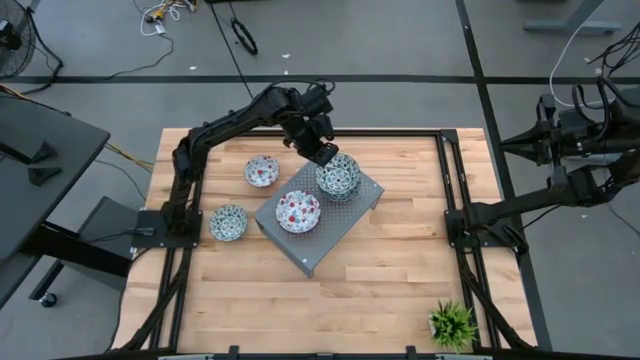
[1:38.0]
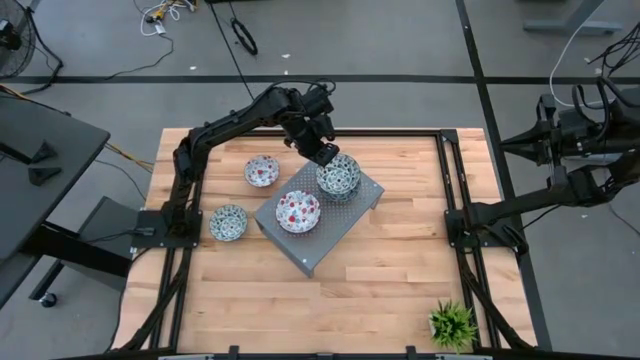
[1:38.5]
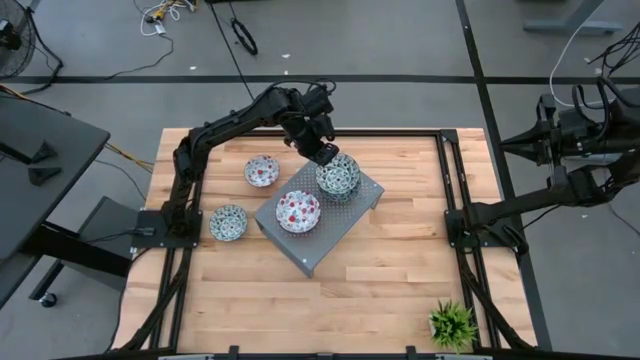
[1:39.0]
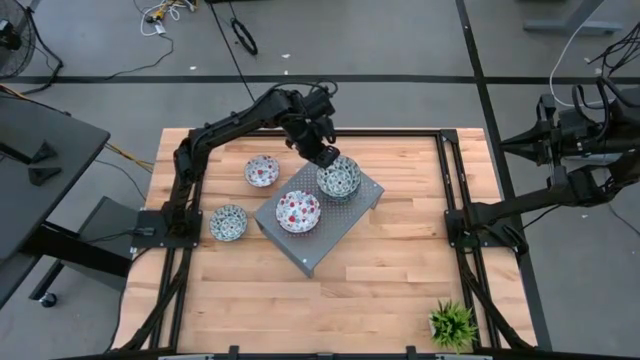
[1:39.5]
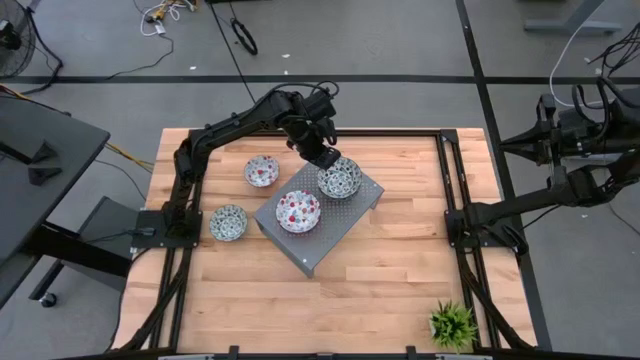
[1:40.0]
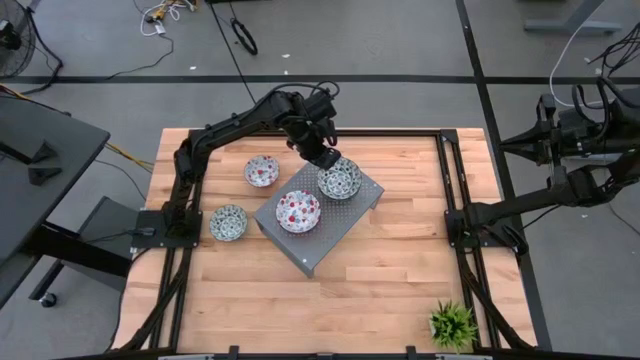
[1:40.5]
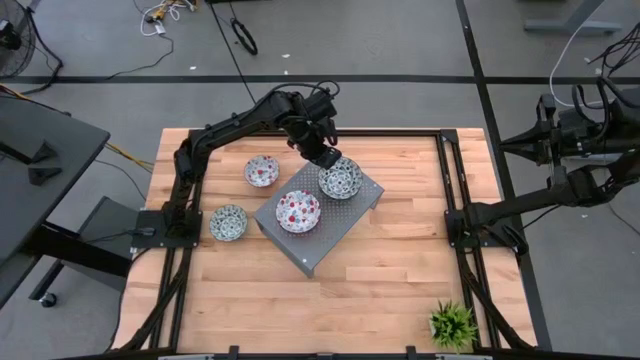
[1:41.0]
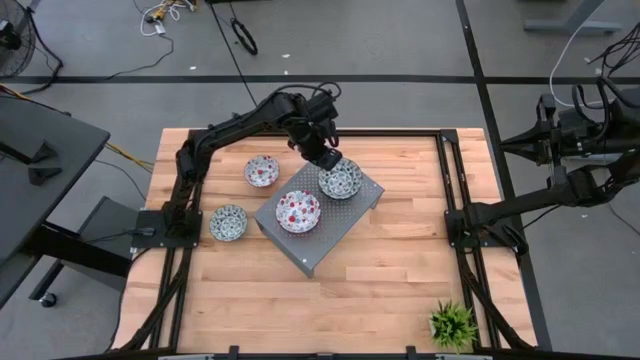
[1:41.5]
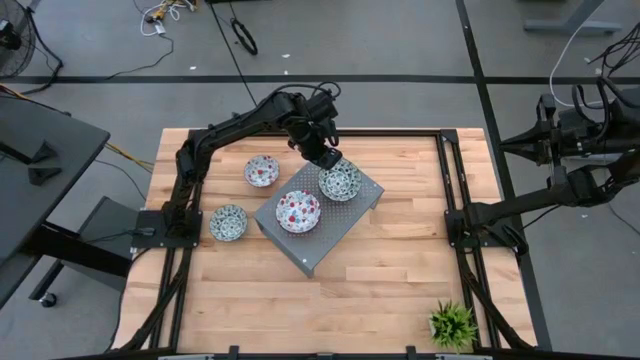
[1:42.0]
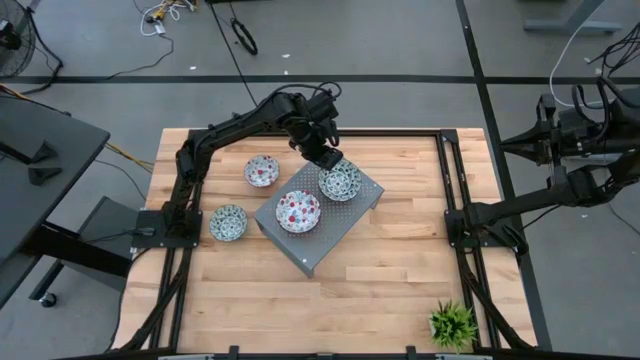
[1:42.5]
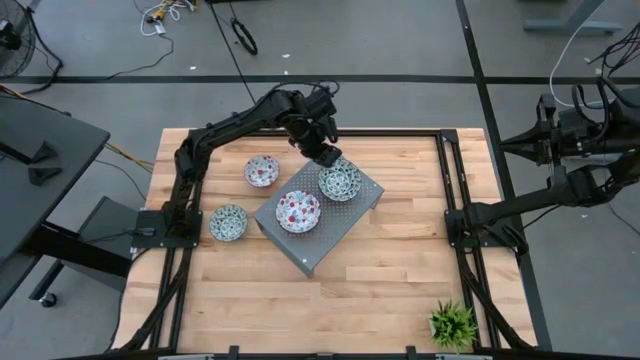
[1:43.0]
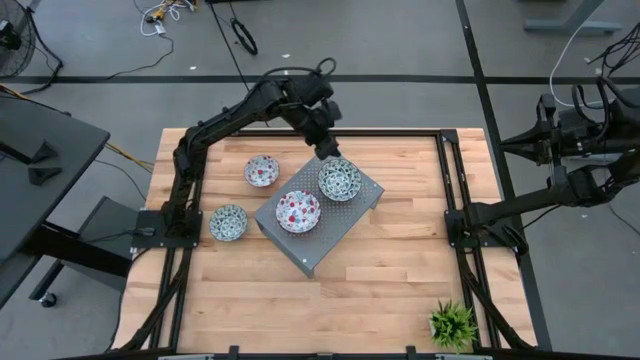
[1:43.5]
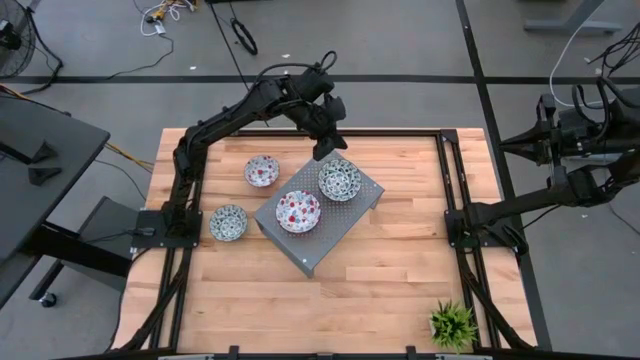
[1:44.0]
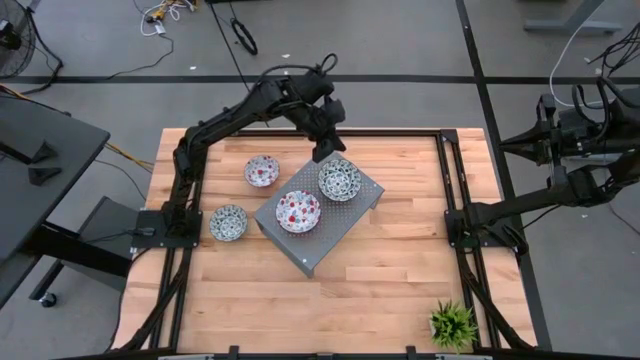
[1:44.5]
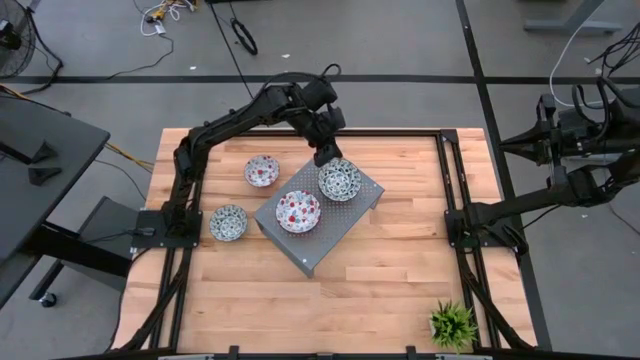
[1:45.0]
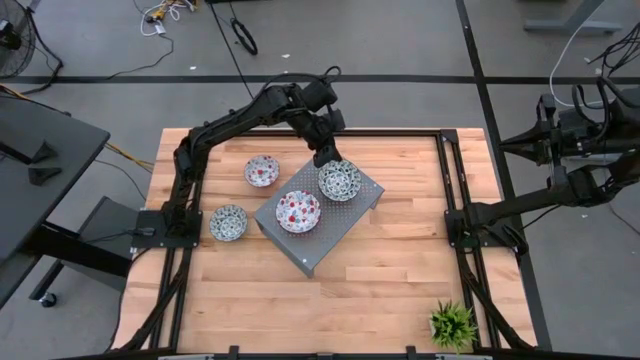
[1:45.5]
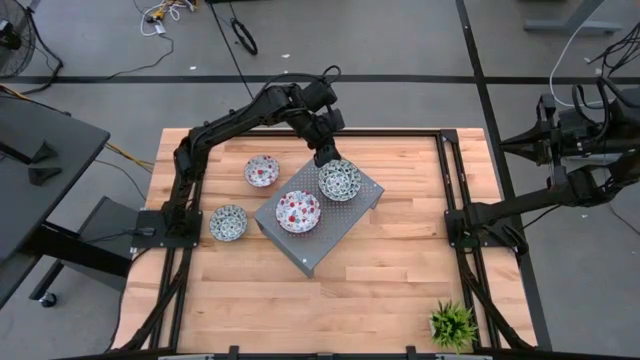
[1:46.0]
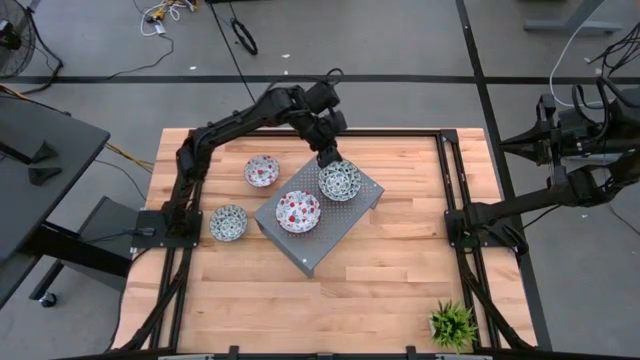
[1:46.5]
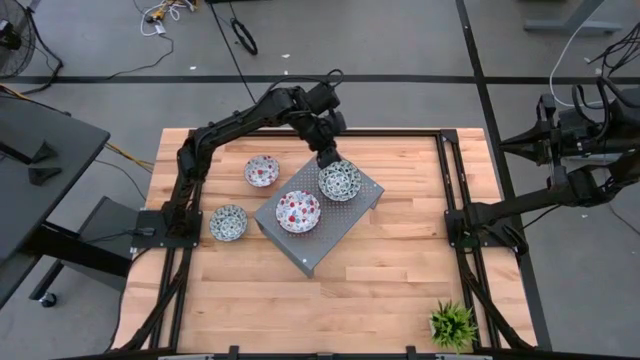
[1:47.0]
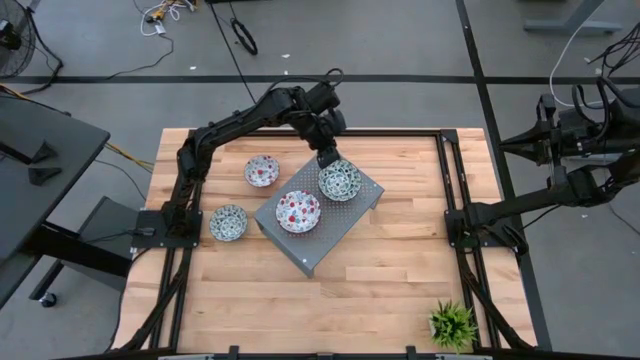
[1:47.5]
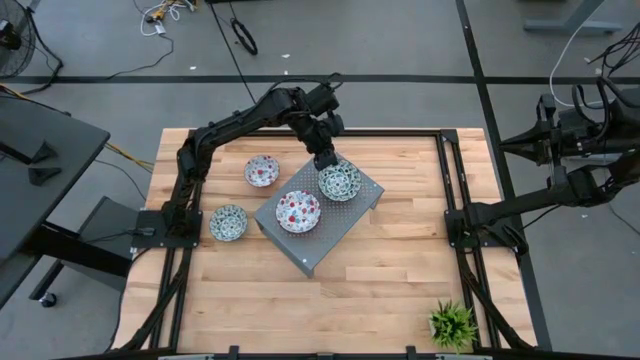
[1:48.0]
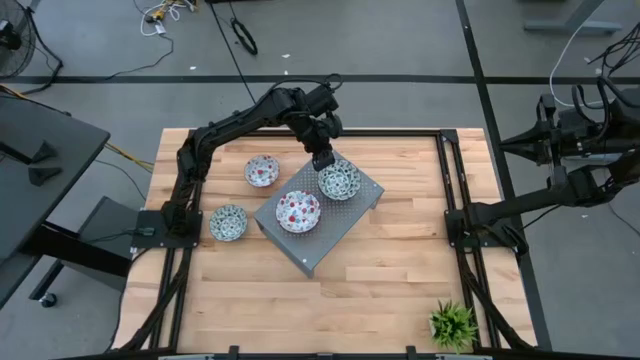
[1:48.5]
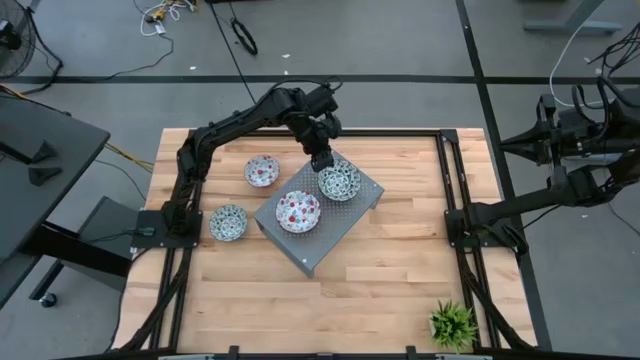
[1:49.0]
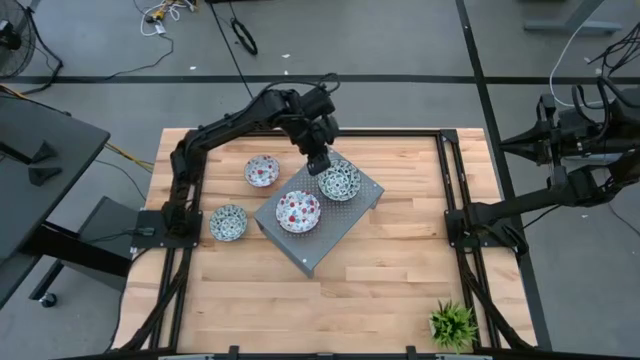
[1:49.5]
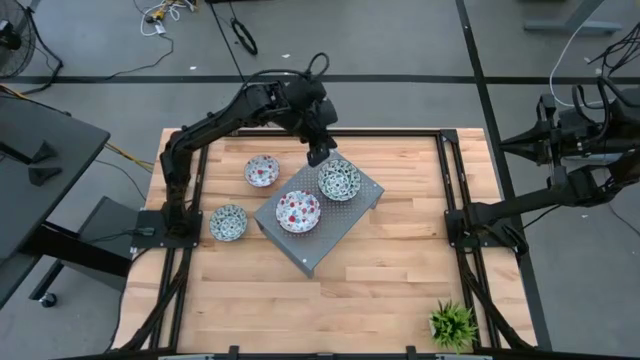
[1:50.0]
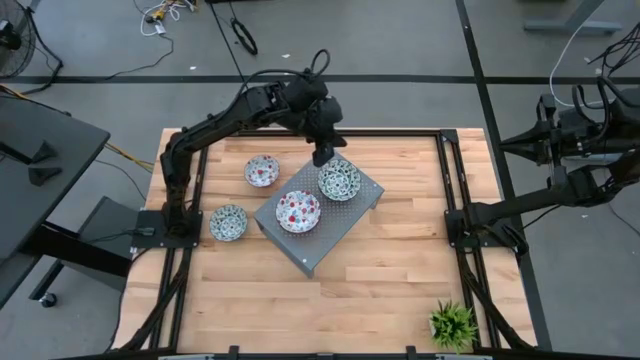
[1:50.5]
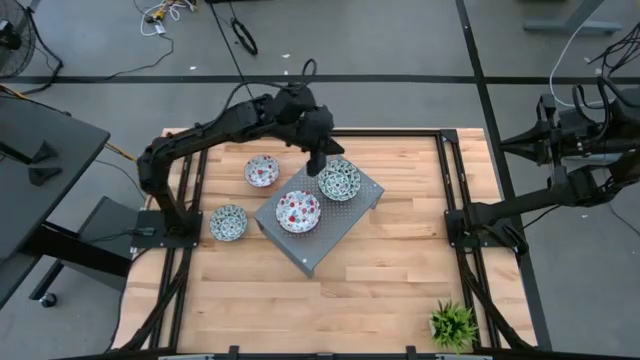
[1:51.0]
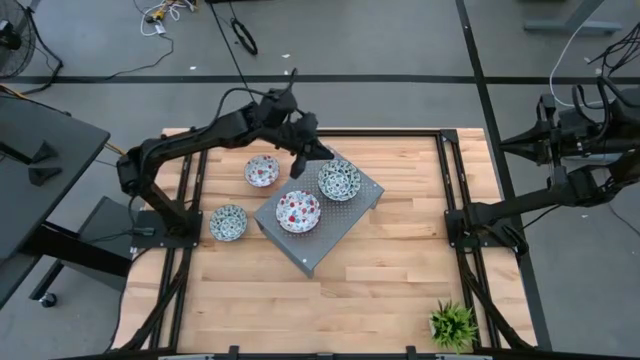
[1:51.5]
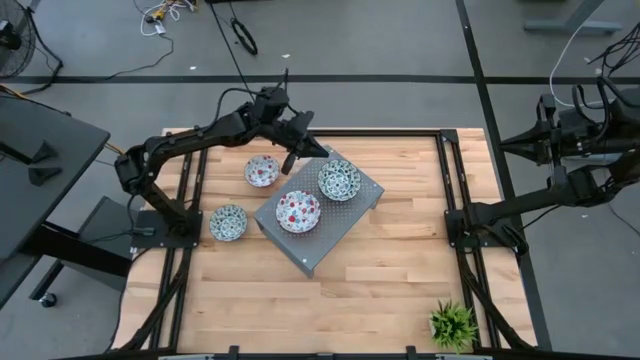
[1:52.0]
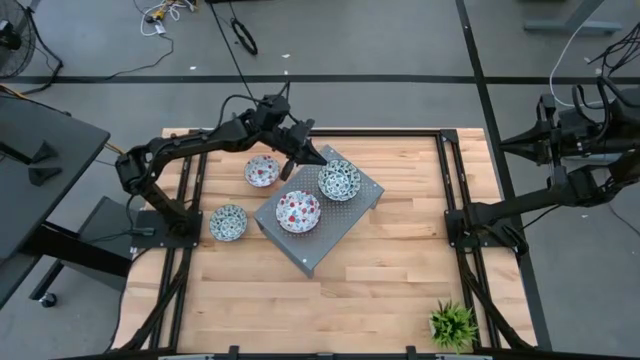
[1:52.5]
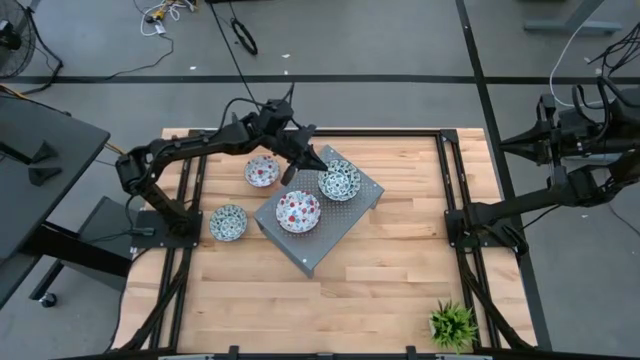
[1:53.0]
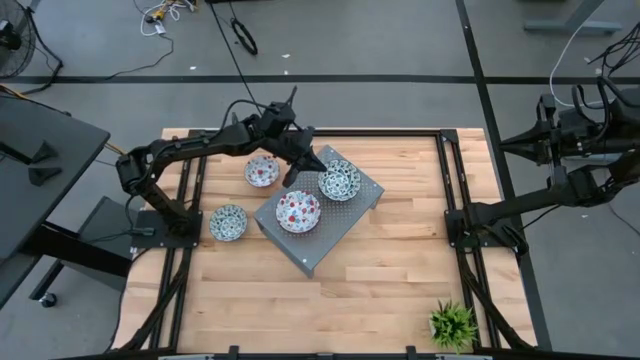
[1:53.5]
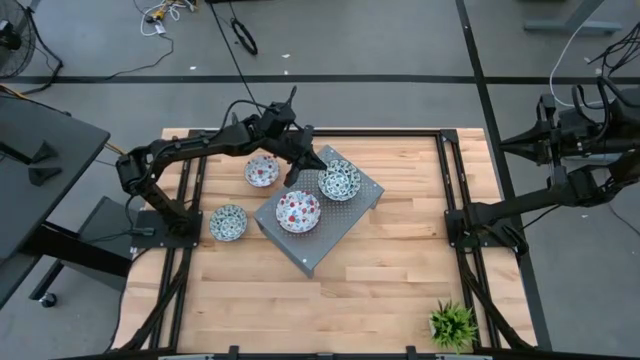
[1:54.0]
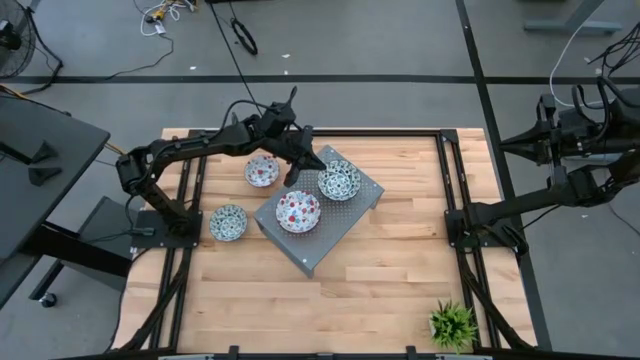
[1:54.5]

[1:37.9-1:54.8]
Task: Pick & Place Mini bowls
Stack the bottom blue patterned bowl on top of the blue patterned bowl on the shelf

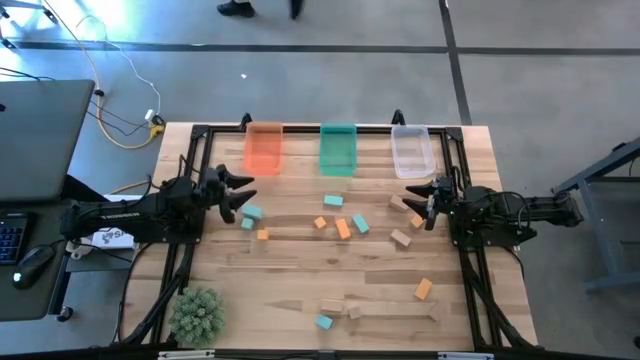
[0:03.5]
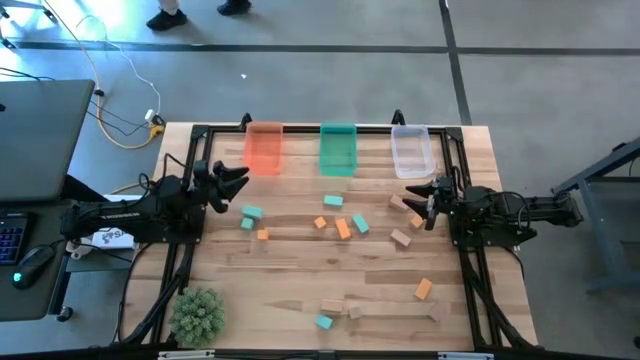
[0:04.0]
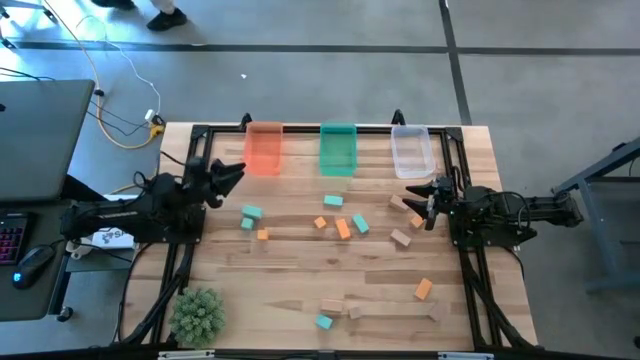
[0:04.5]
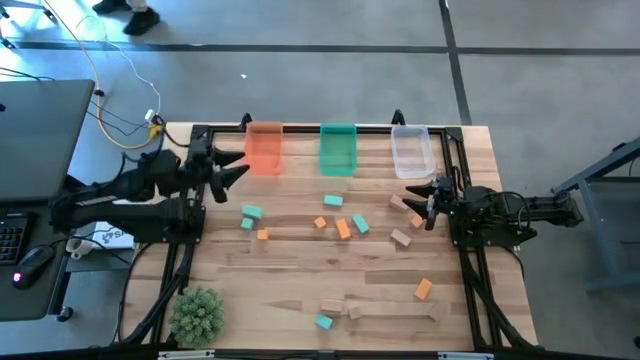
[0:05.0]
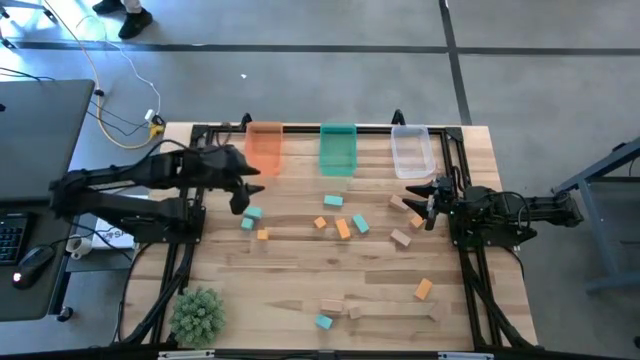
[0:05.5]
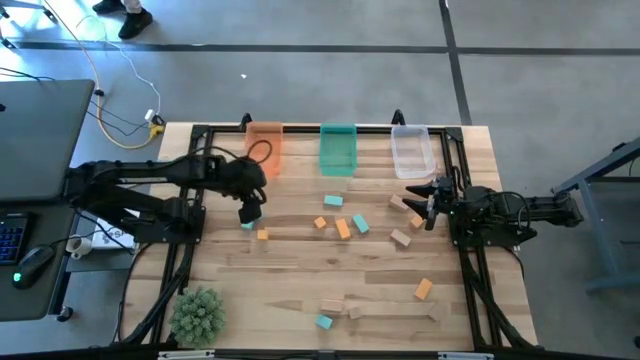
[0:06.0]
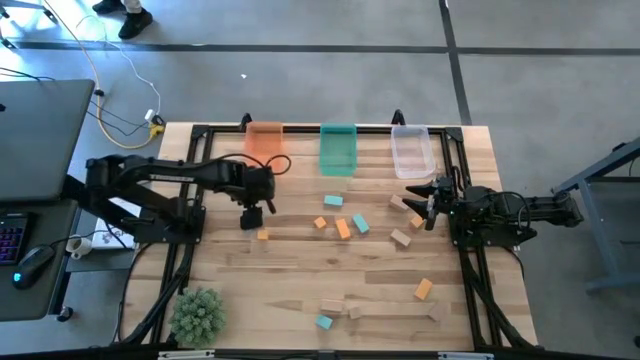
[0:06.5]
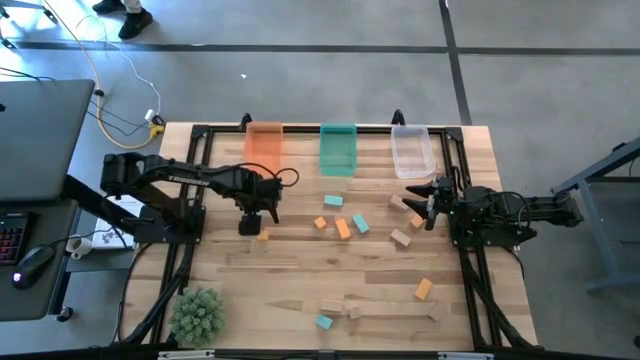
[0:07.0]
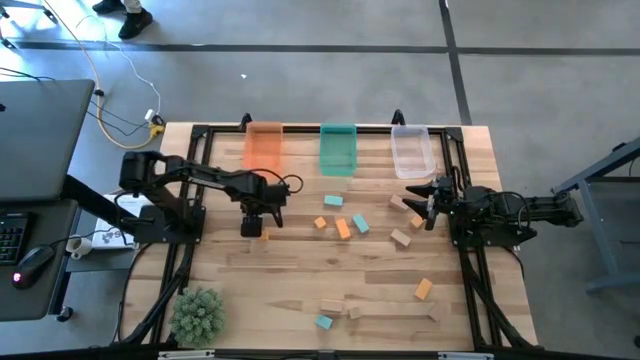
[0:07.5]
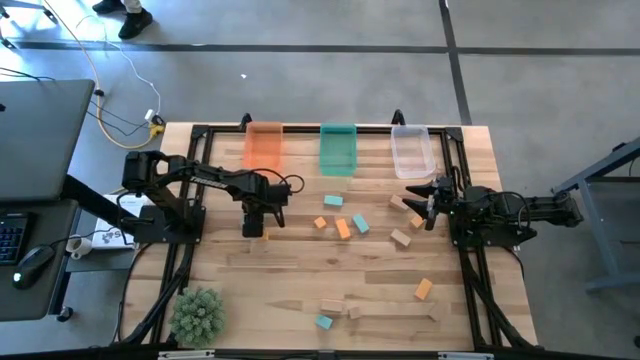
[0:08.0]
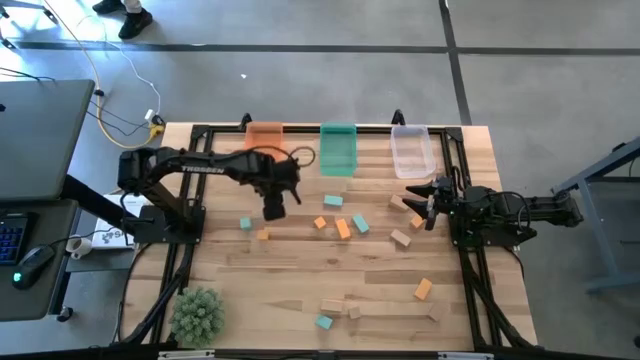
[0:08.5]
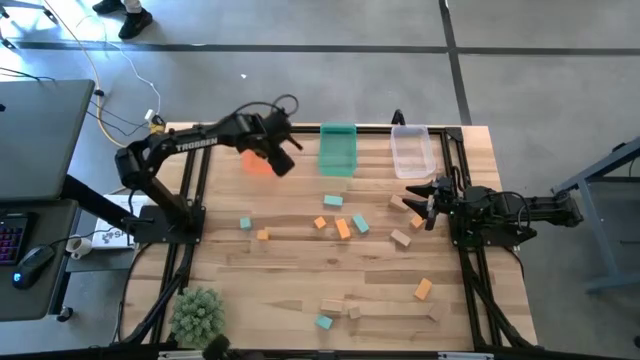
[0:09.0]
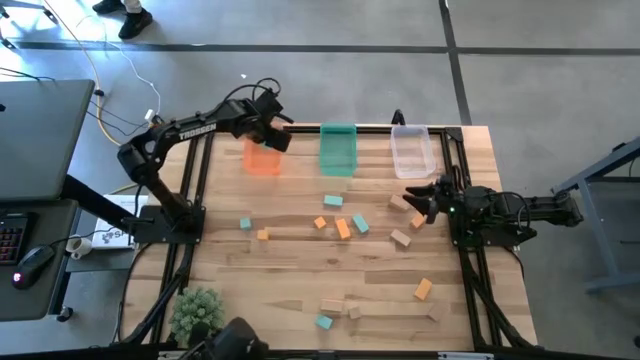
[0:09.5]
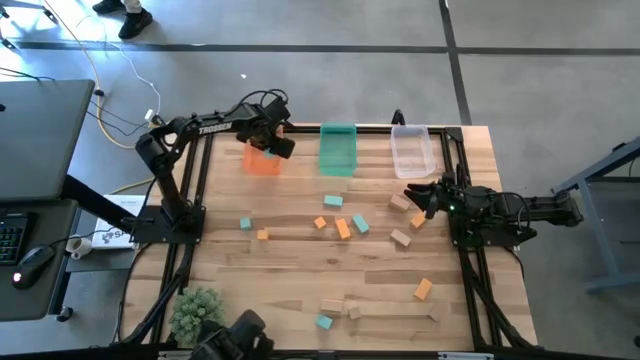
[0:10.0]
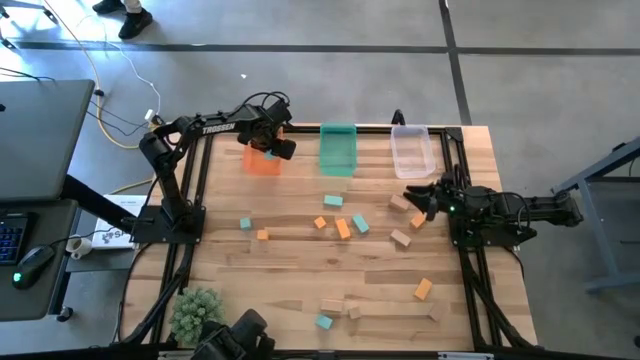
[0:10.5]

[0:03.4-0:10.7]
Task: Sort & place blocks by color
Put the light blue block into the orange bin
